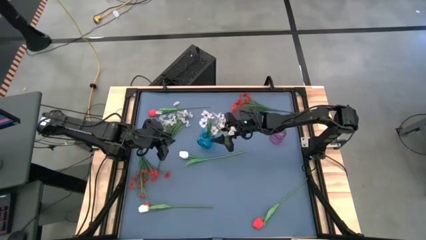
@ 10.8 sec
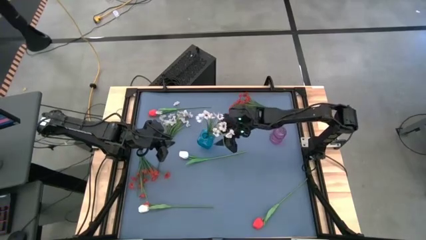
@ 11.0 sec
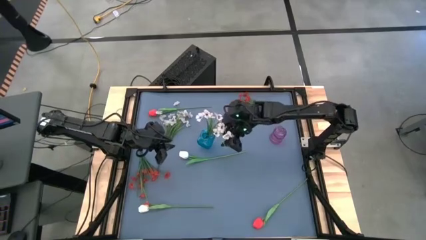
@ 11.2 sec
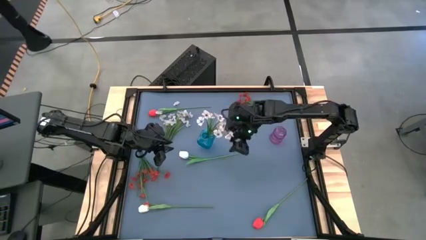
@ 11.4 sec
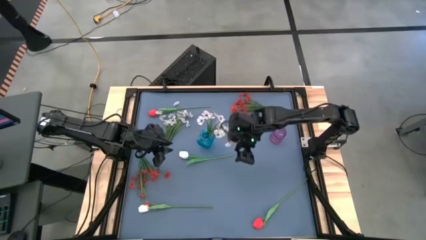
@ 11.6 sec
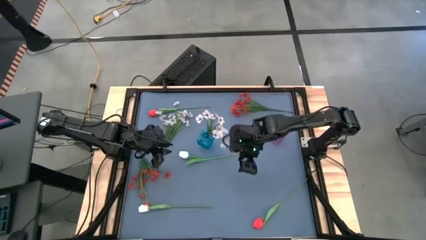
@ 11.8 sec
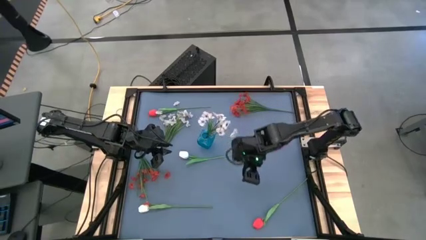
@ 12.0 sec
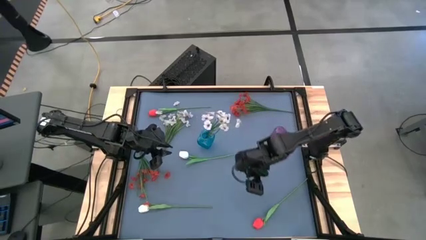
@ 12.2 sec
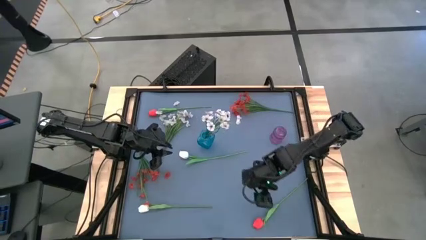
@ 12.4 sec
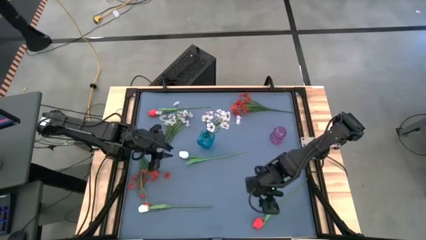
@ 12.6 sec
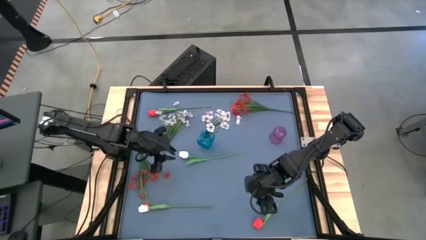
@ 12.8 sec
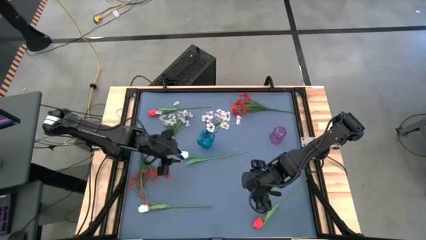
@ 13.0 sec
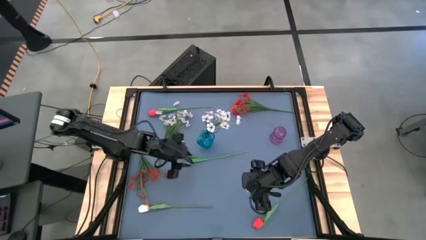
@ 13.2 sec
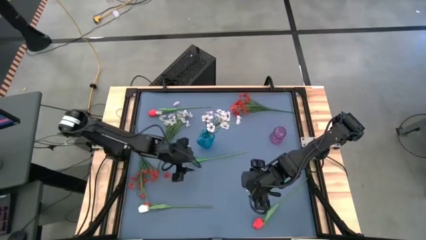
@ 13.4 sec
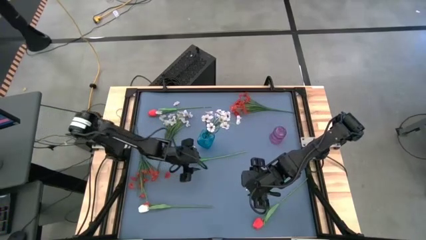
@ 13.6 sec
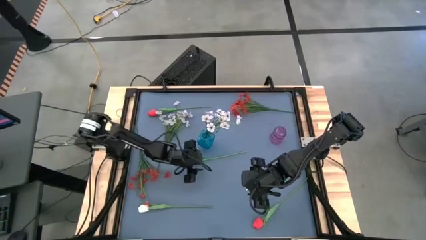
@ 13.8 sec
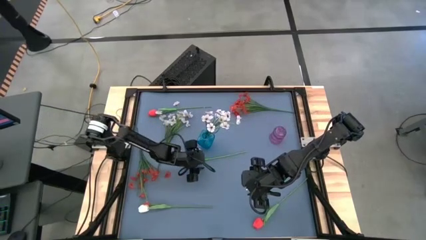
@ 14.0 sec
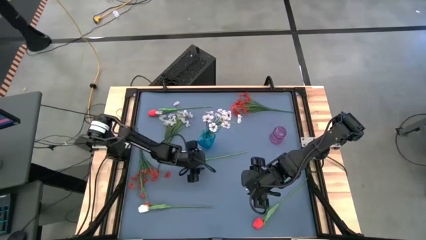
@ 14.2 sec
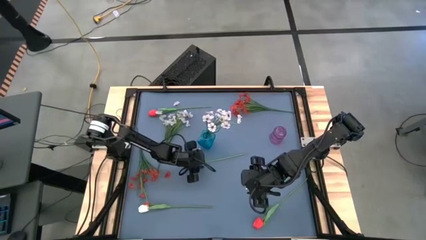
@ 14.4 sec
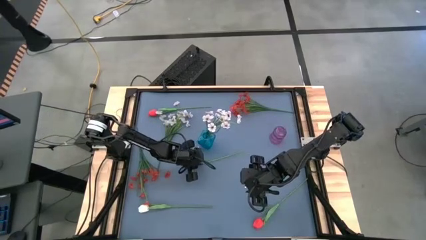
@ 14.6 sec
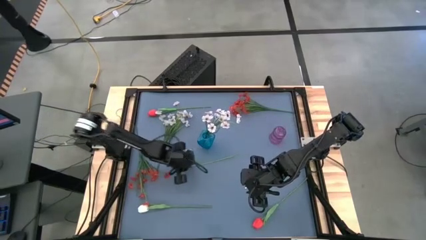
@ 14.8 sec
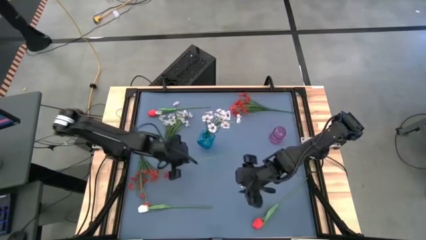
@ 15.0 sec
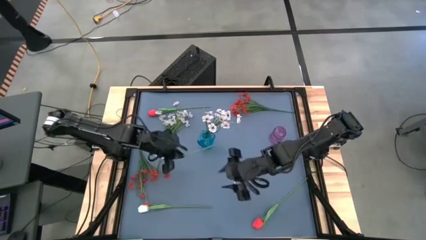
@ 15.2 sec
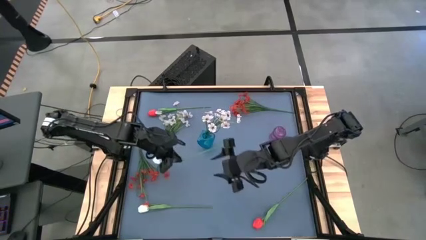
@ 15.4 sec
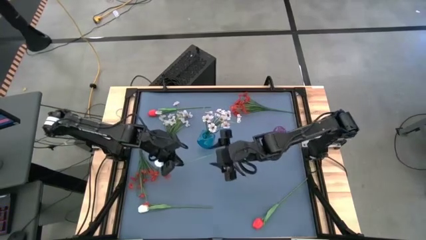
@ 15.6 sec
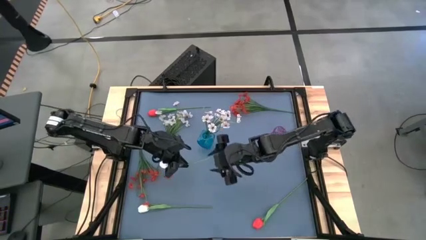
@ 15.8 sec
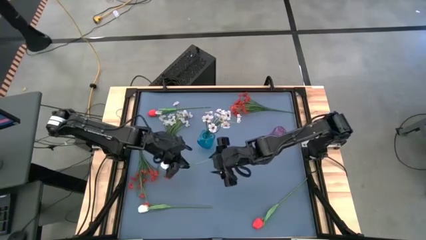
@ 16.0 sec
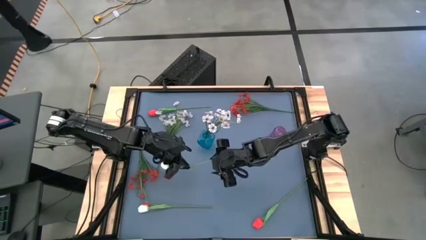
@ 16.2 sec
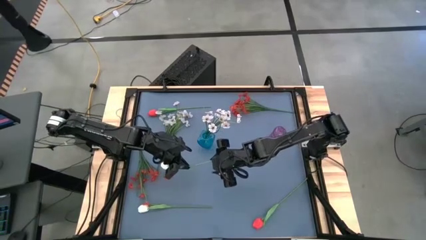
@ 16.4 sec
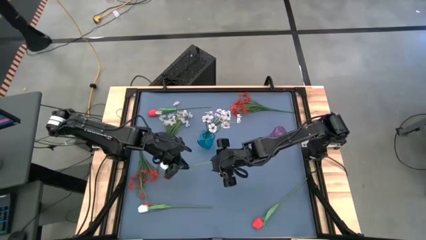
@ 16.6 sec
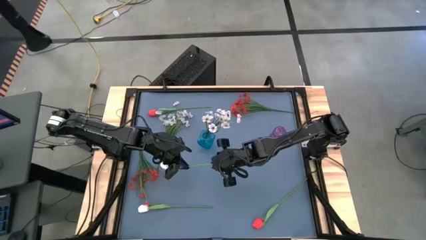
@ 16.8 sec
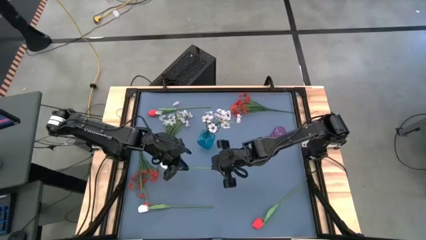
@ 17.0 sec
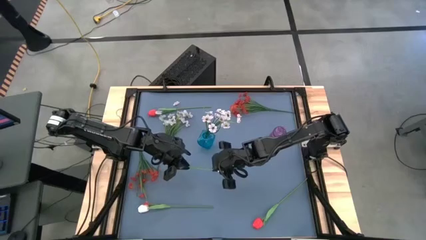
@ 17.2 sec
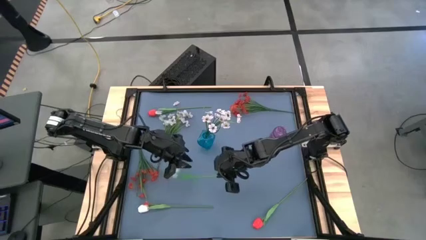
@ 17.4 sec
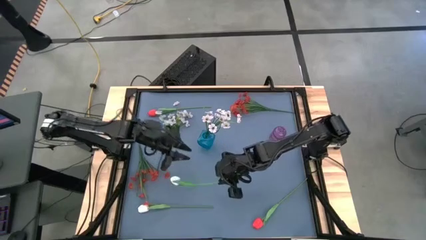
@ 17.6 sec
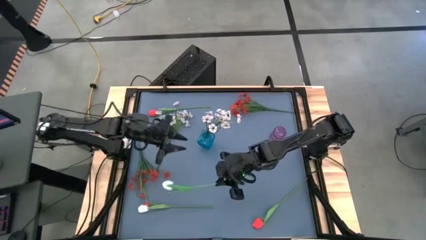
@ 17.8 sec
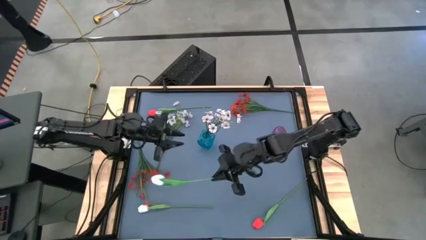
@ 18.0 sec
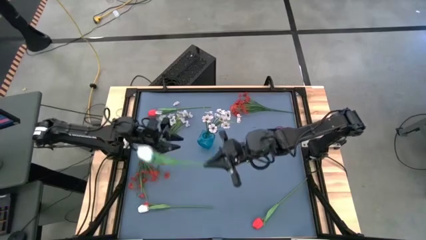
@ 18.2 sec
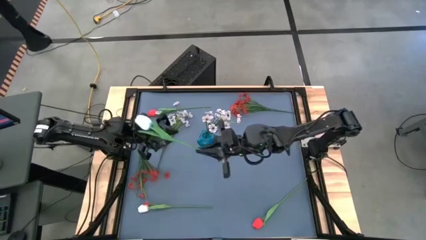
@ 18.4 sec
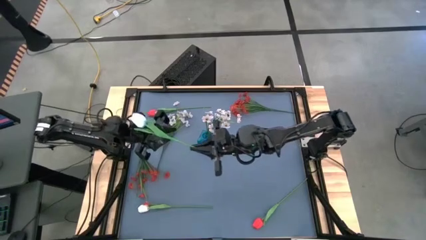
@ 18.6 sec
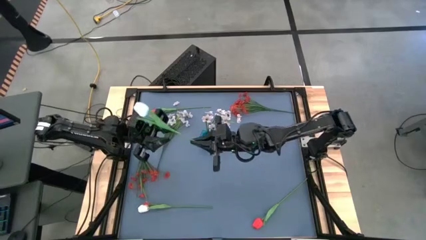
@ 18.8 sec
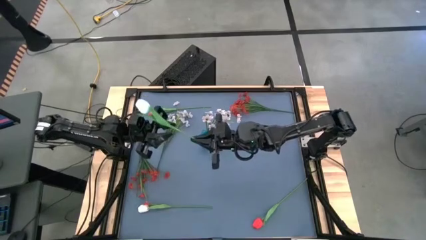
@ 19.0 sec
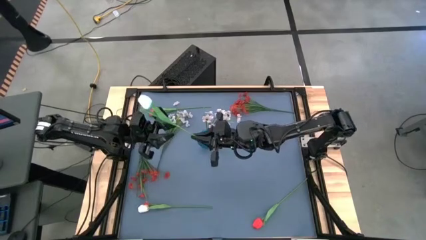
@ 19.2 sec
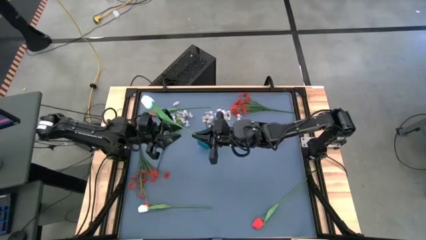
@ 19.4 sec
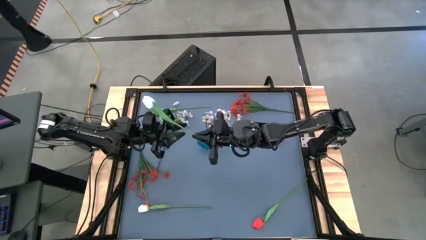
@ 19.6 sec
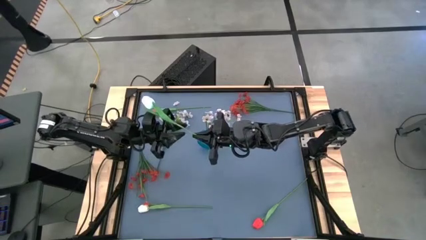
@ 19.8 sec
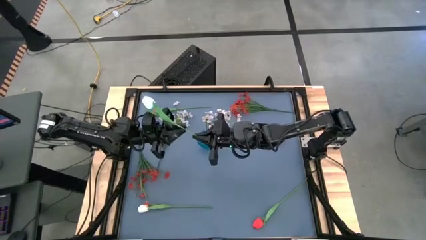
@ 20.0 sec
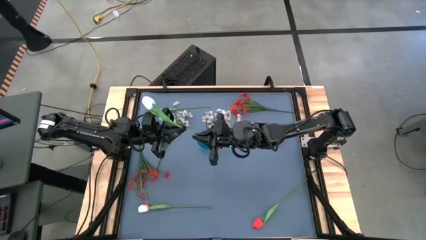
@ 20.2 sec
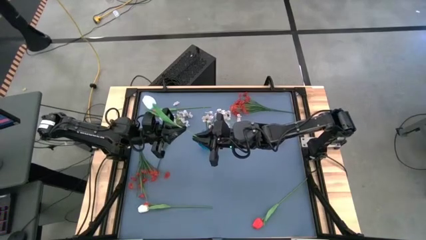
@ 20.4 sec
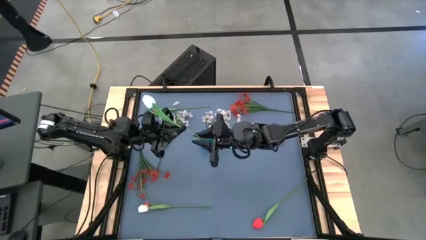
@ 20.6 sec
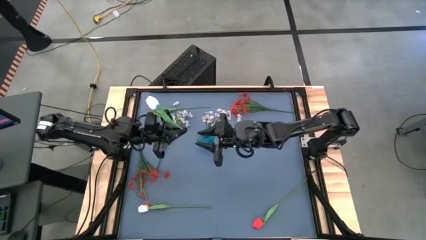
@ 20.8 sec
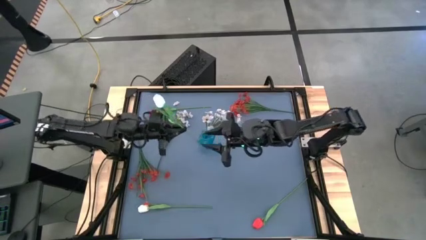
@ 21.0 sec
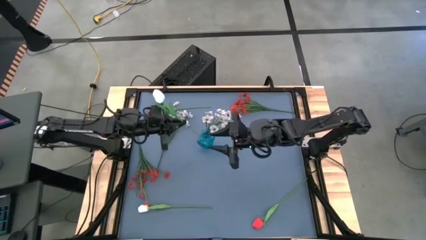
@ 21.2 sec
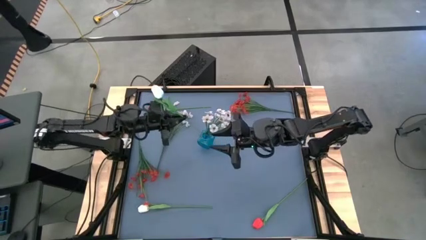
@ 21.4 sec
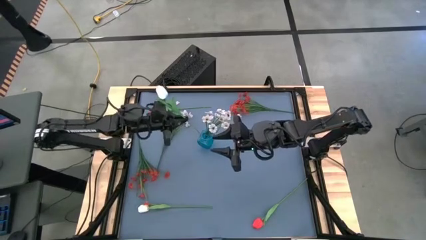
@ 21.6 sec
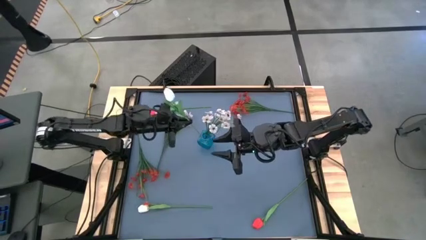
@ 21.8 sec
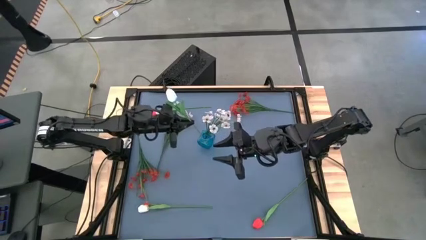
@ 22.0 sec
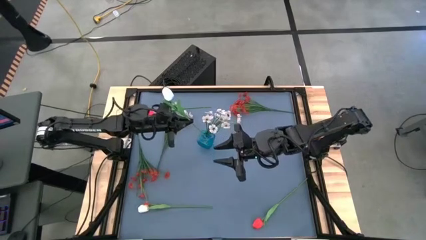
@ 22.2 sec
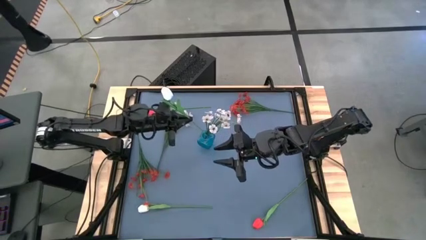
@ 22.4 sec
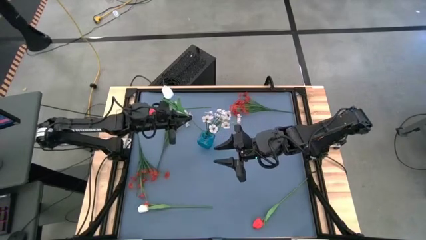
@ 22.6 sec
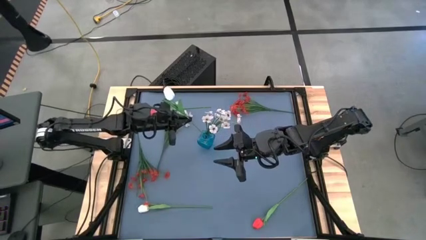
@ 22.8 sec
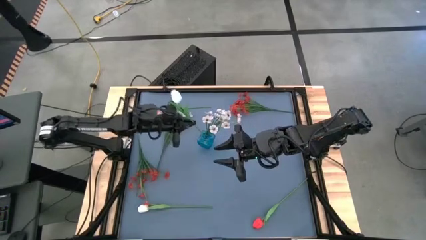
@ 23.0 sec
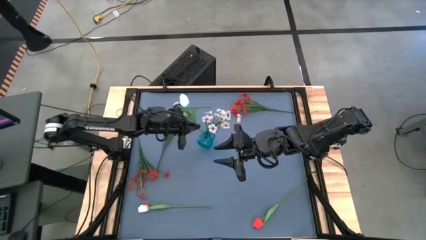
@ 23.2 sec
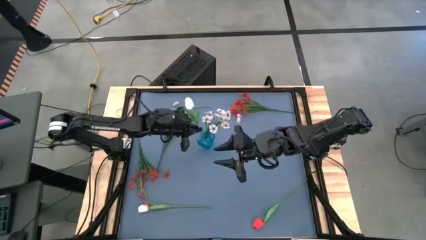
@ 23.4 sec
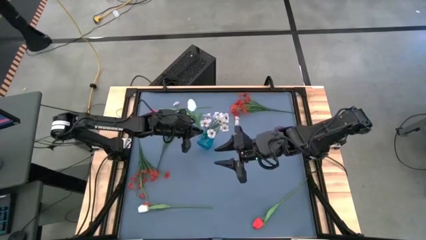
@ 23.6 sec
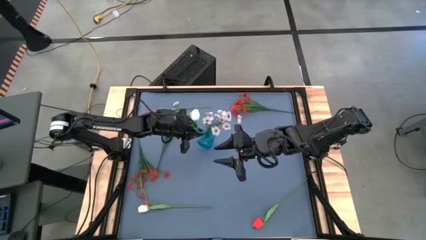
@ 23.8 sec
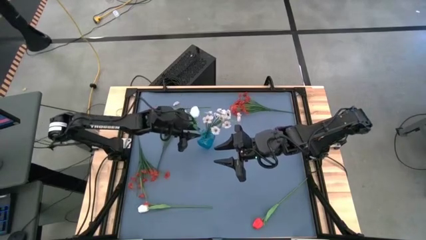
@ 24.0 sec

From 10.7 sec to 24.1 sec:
Task: Sort flowers into vase by color
Put the top white flower into the blue vase
